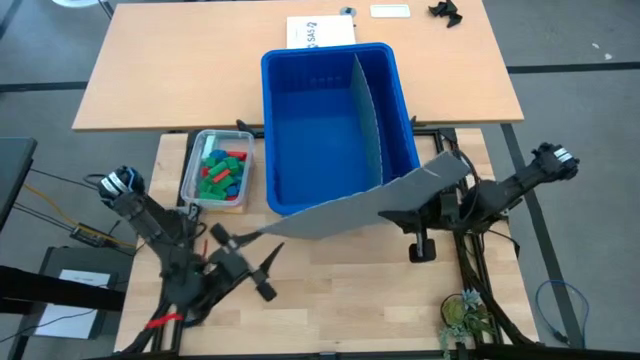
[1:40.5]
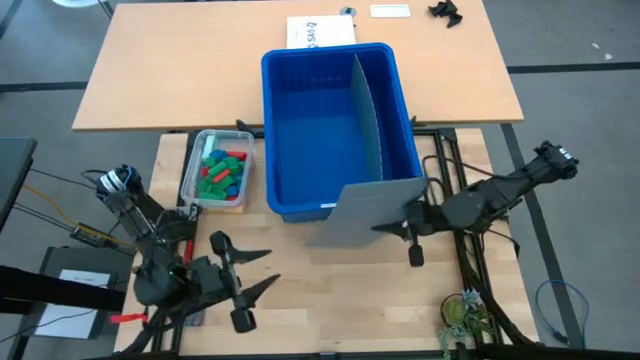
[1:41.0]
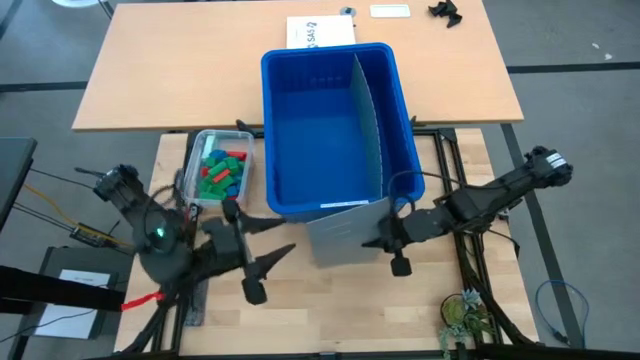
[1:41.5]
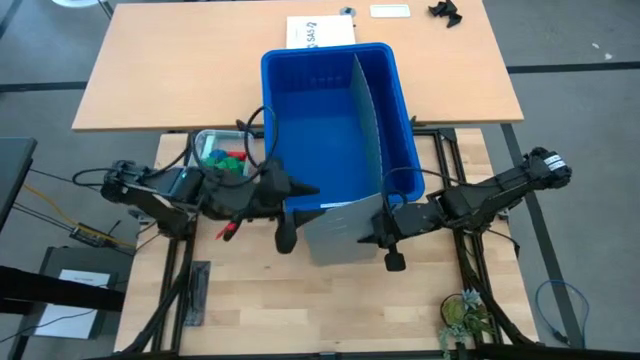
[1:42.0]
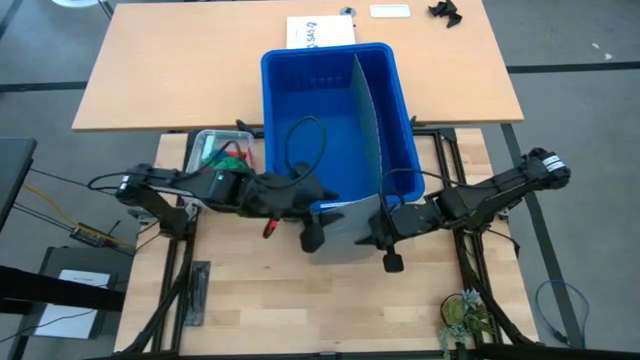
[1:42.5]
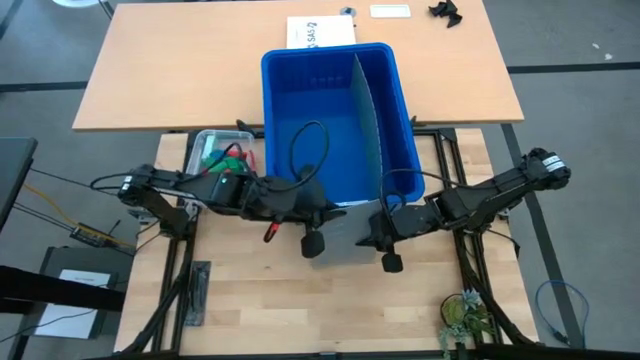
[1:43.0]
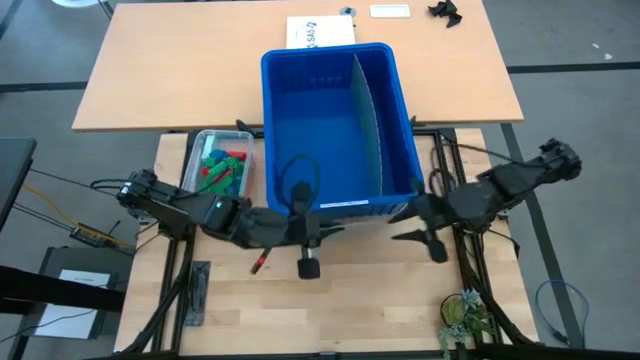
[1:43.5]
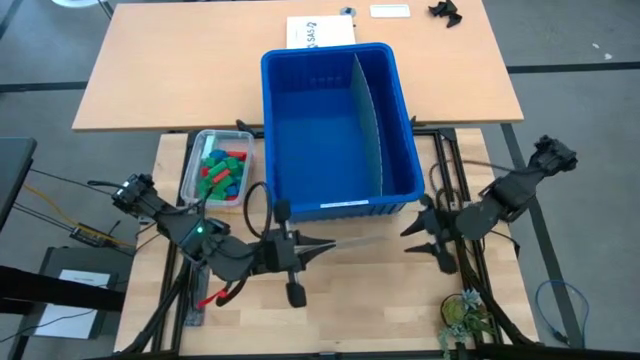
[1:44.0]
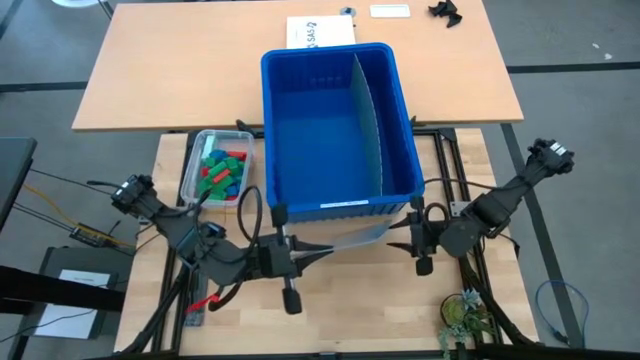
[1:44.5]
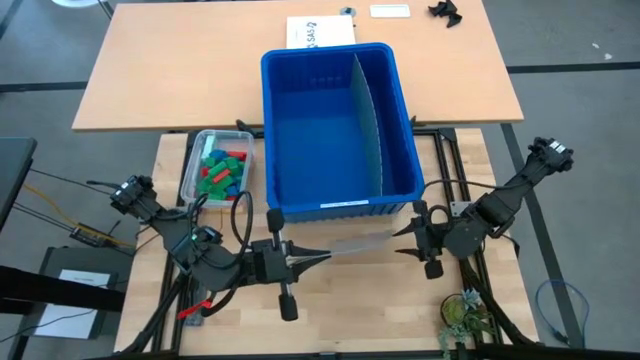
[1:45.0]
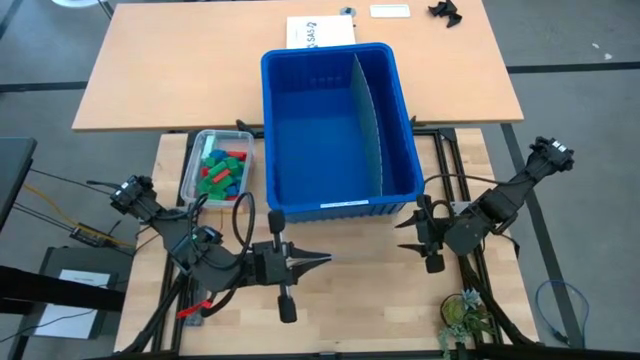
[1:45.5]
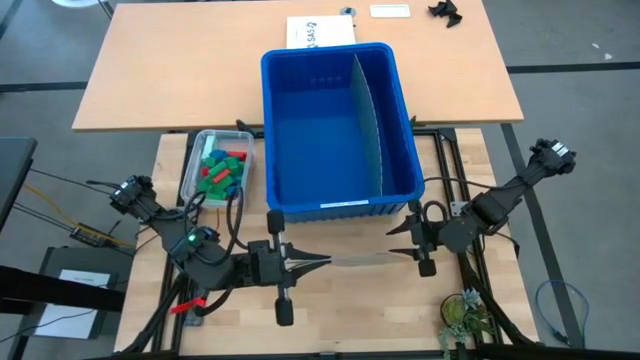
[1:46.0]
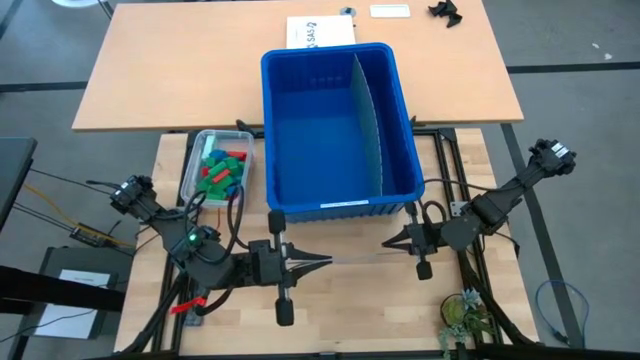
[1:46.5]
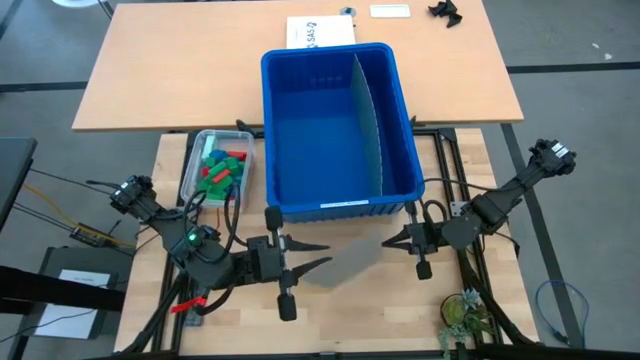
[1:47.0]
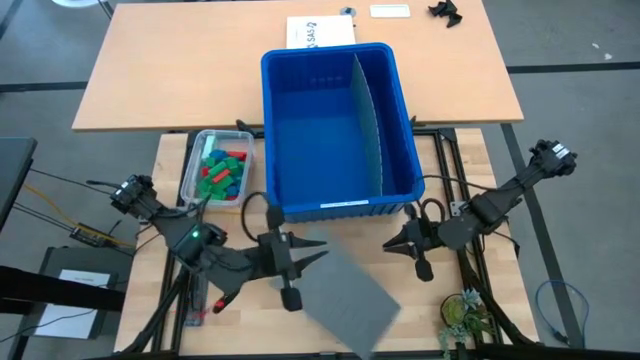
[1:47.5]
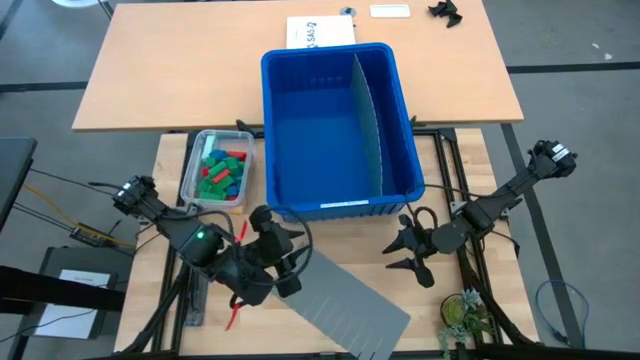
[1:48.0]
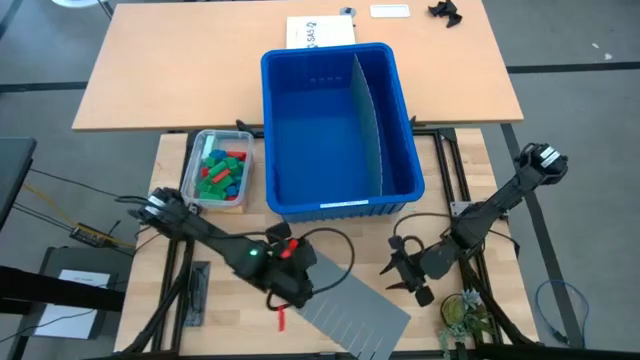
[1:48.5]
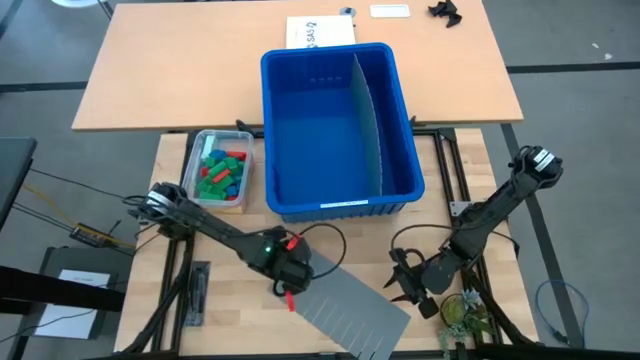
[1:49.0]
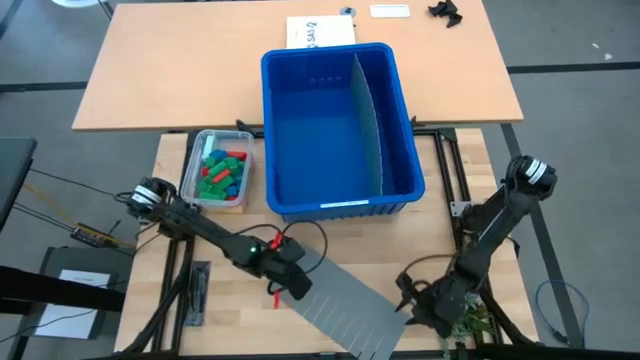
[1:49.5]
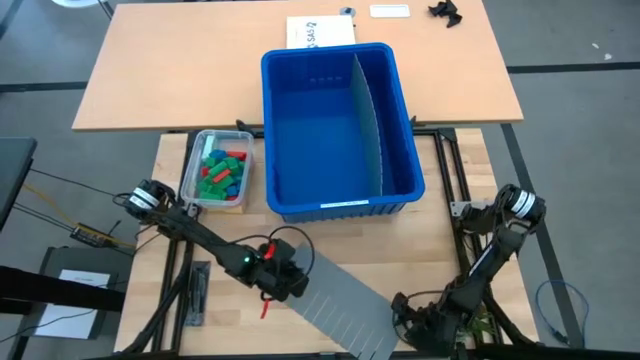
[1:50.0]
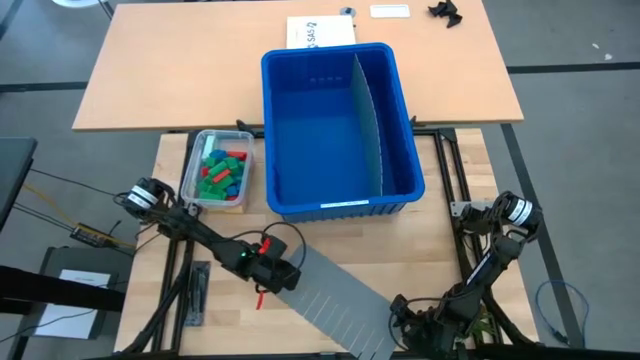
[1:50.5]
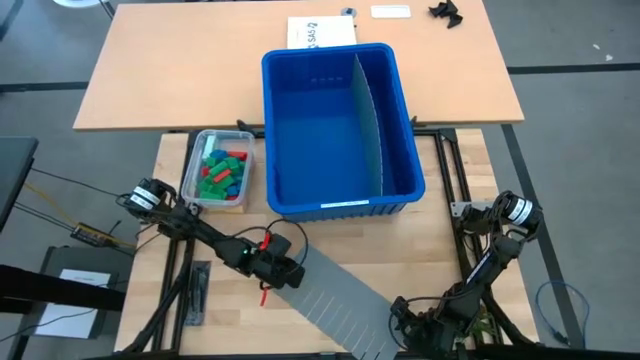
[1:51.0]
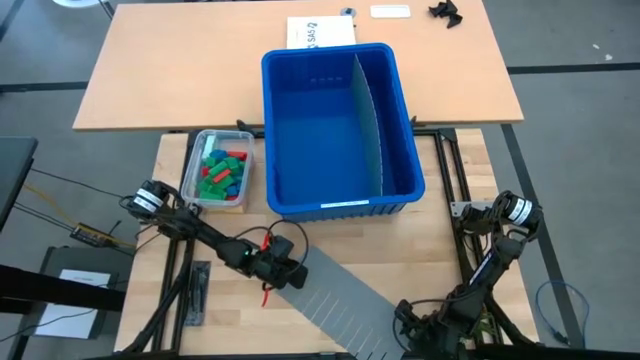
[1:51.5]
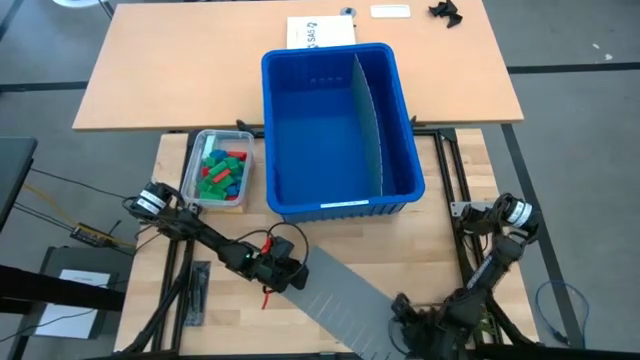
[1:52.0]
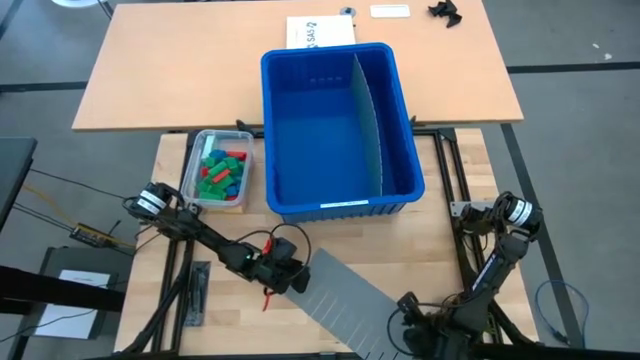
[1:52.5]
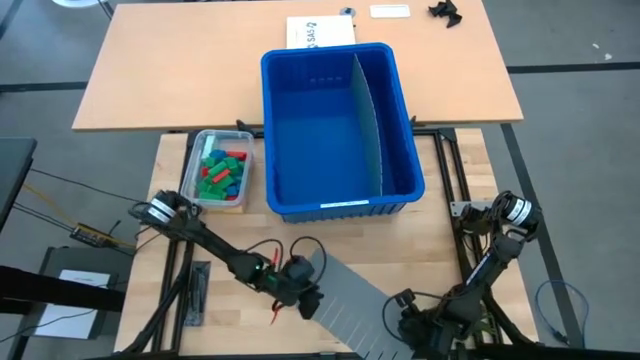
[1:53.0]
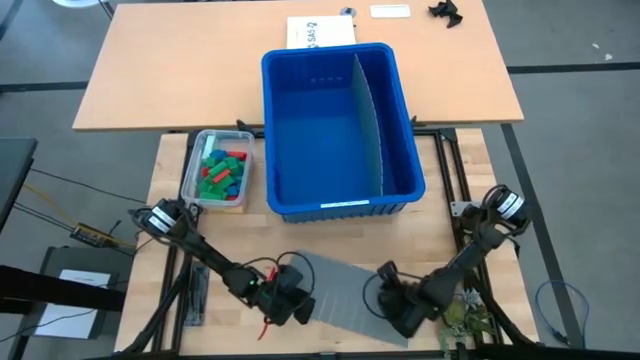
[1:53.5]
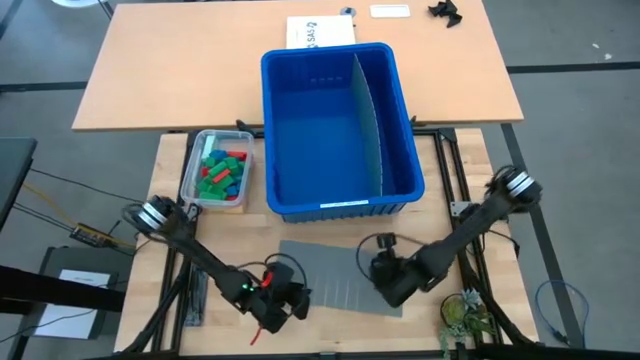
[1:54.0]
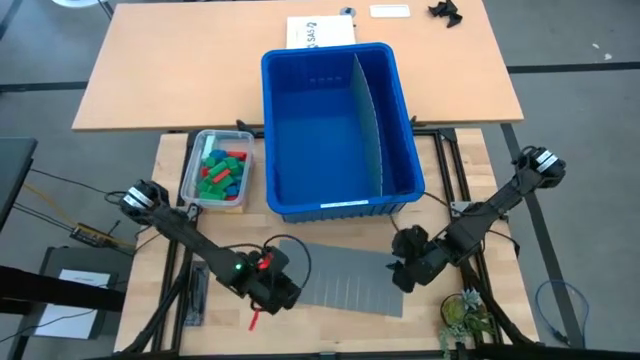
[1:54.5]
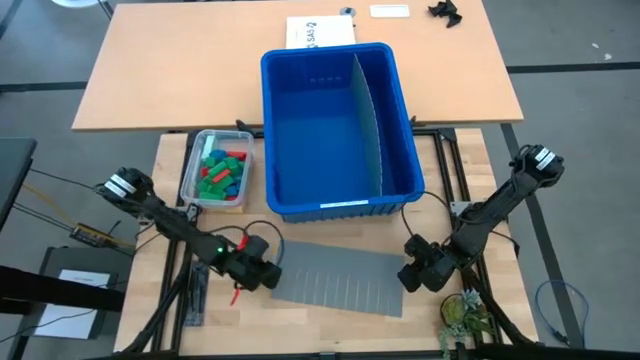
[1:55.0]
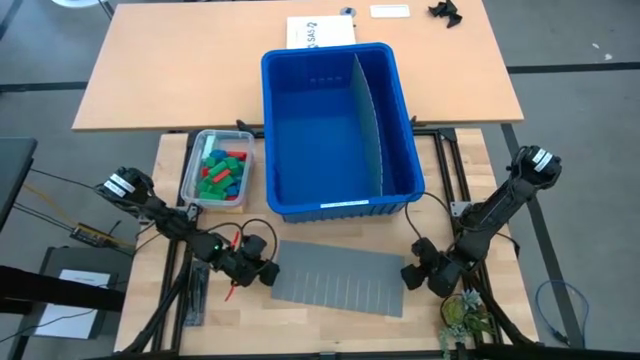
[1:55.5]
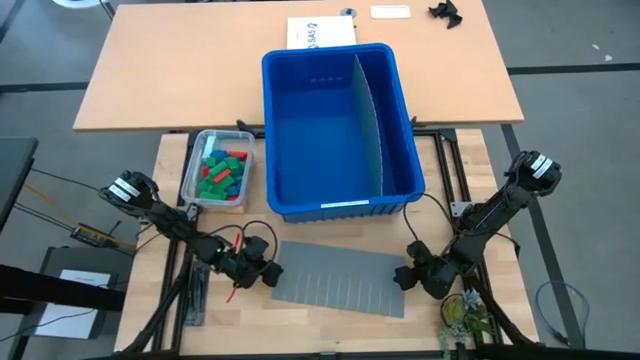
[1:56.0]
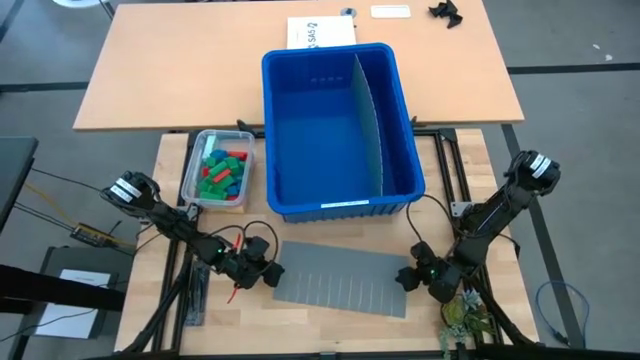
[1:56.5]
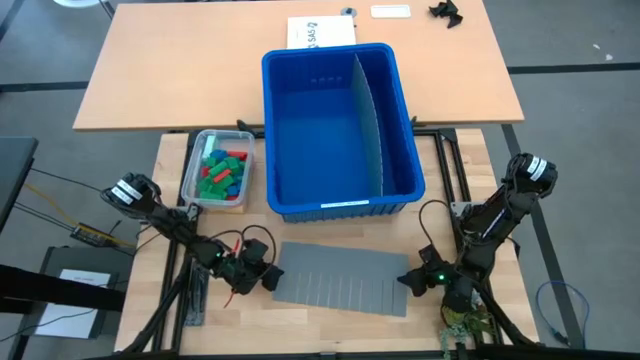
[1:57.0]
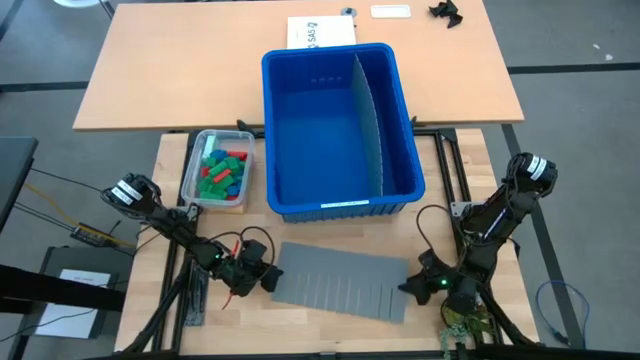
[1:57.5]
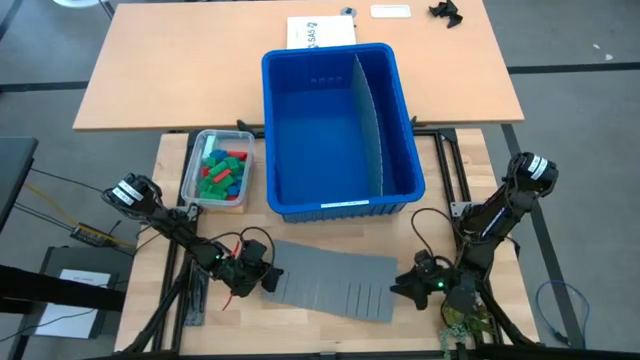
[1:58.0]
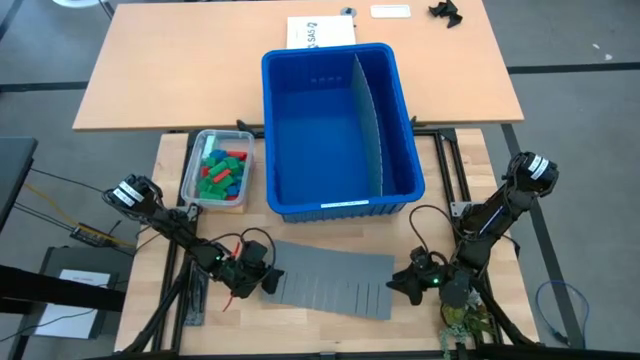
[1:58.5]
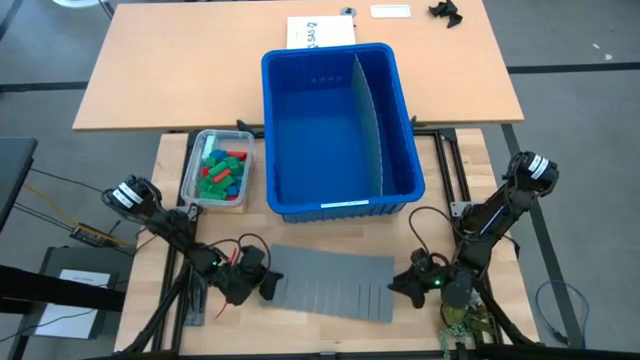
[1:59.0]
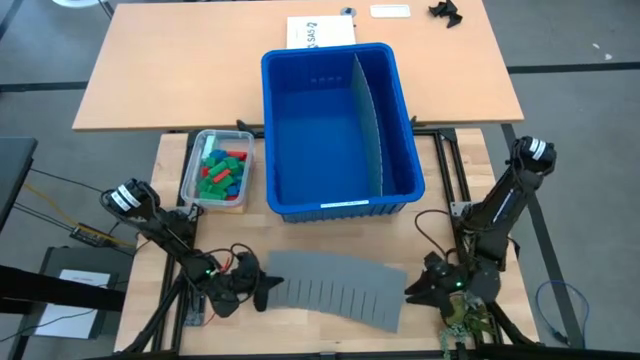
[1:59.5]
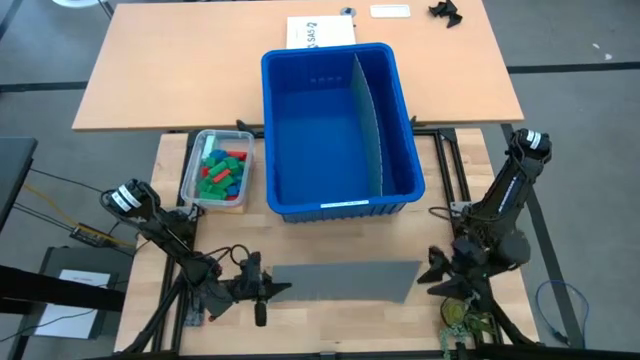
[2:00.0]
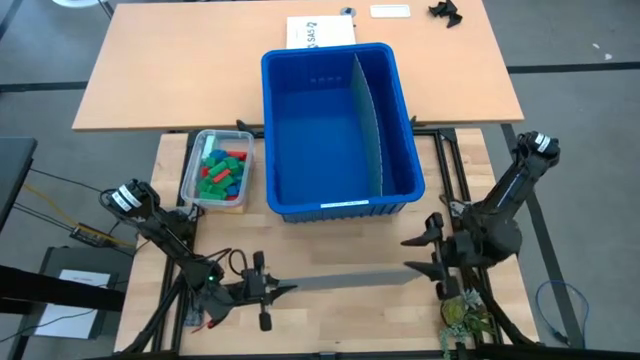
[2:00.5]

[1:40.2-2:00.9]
Task: Sort blocks
Assemble the blue bin using bin divider
